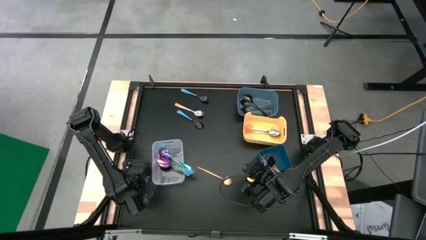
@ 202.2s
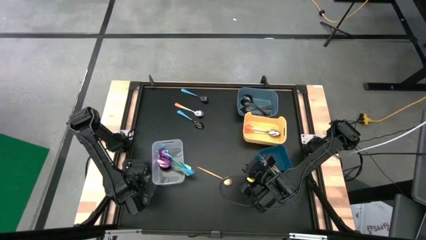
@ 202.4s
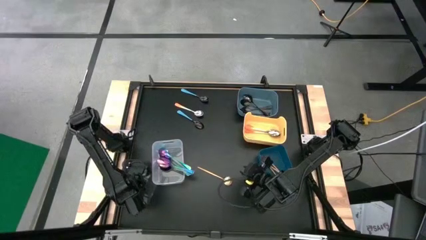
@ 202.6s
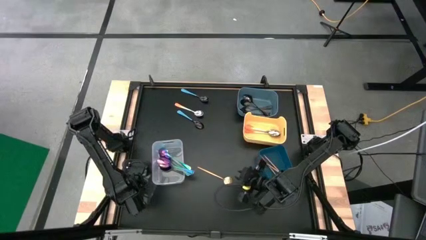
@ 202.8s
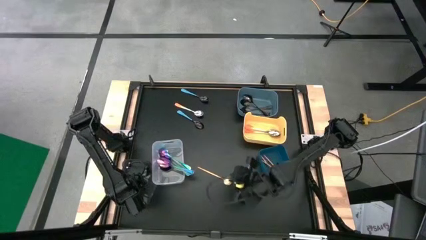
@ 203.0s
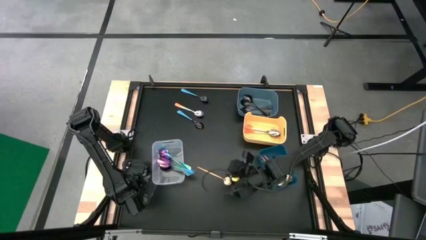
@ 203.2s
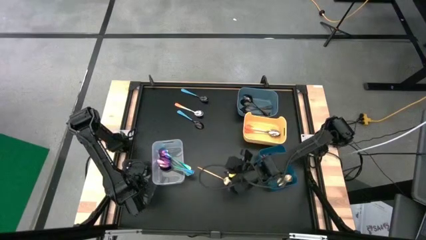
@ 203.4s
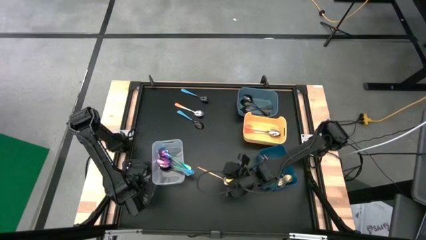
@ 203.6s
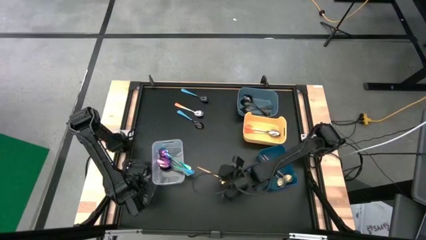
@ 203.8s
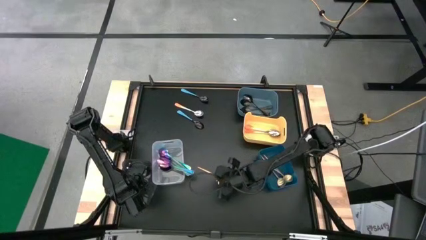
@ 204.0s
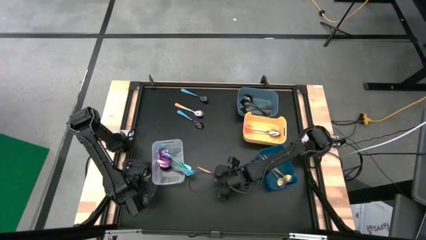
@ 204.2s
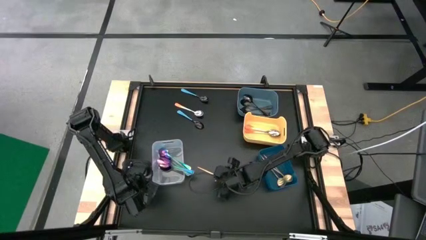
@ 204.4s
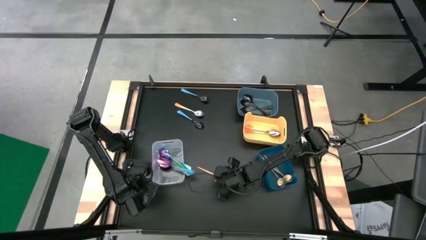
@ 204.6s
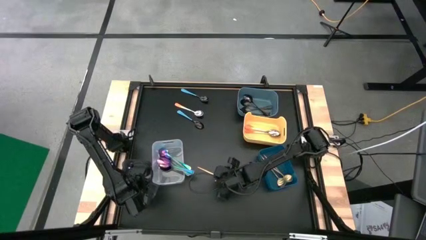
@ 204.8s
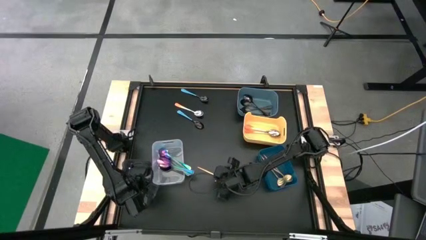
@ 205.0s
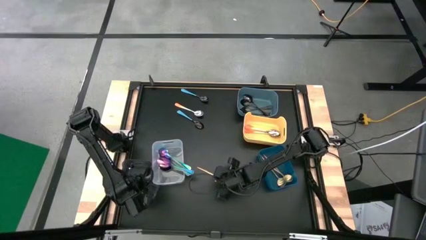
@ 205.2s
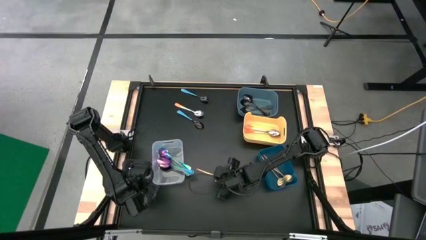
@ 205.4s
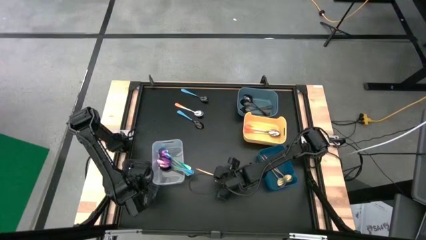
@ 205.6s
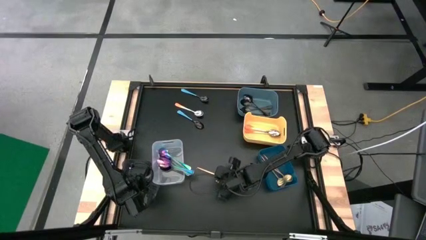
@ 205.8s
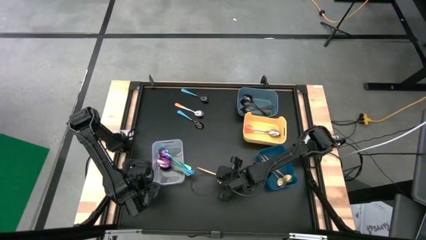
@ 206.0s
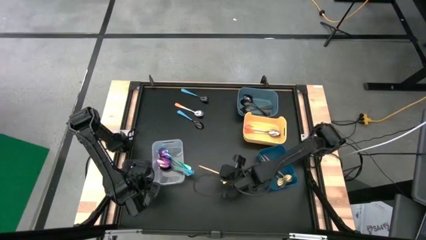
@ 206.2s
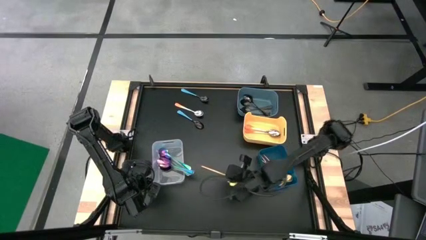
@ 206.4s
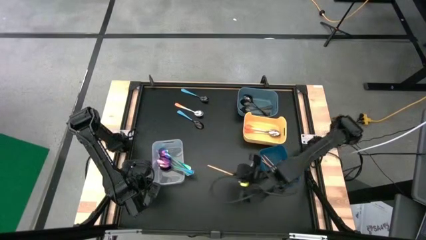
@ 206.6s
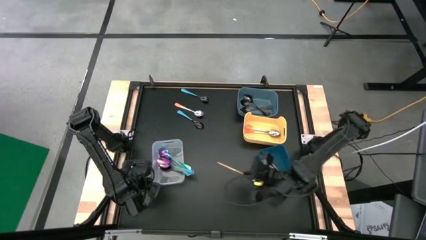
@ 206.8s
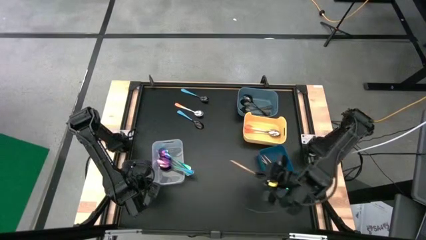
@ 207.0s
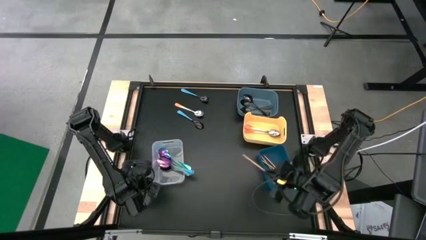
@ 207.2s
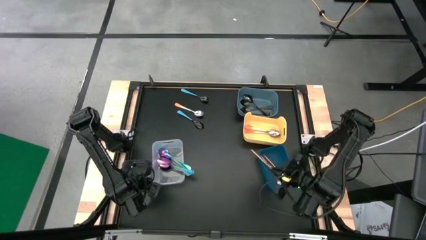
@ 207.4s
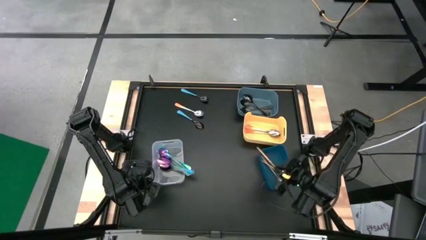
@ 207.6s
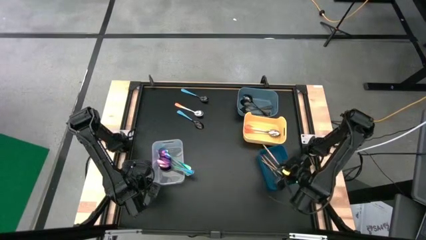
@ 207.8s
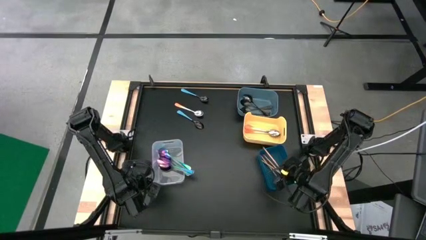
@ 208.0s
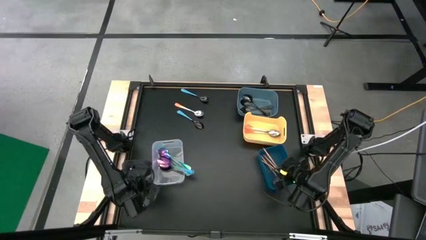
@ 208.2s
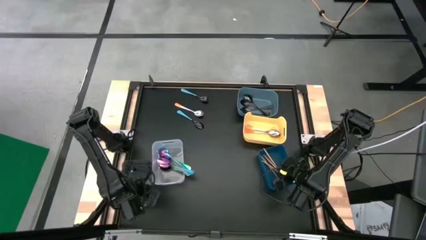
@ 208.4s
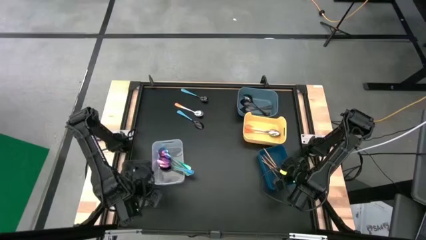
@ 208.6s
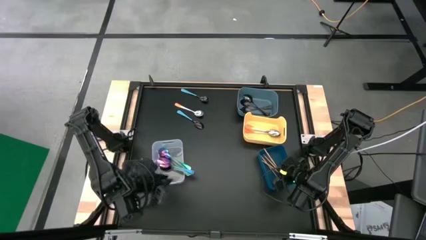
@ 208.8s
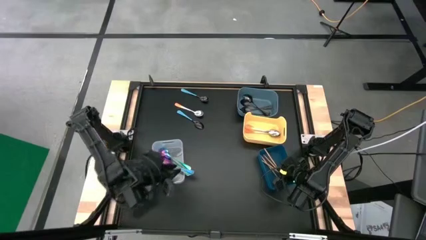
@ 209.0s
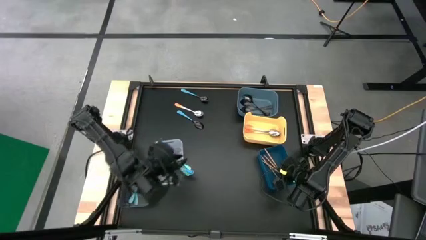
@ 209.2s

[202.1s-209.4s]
Task: Sort silverware by color (type)
Put the yellow spoon into the blue bin

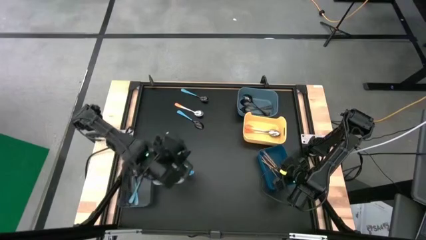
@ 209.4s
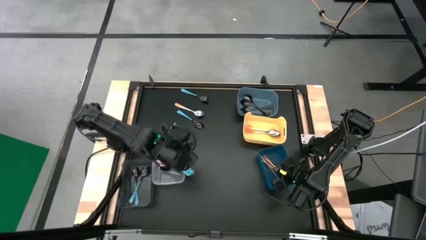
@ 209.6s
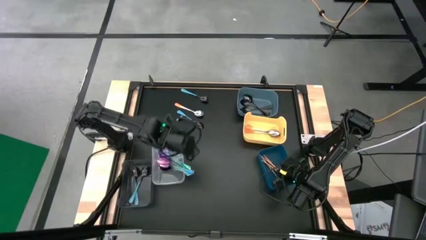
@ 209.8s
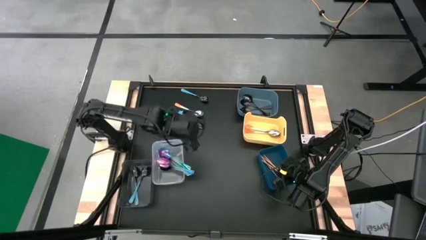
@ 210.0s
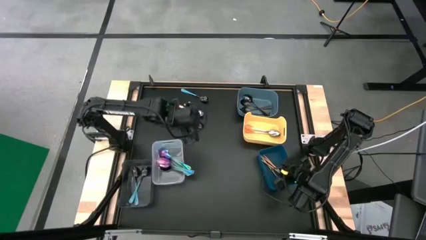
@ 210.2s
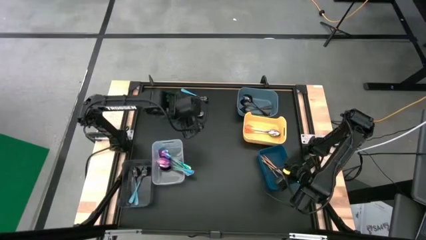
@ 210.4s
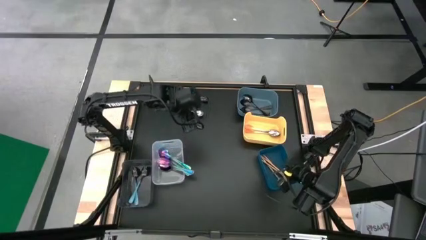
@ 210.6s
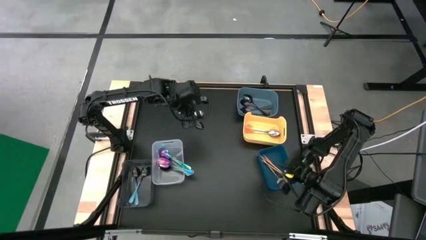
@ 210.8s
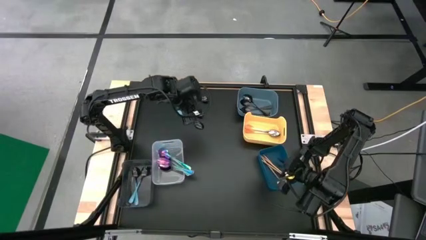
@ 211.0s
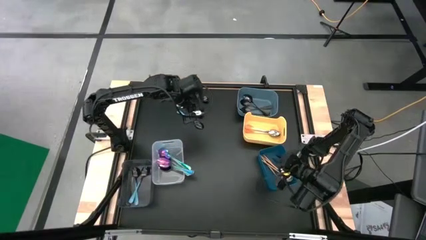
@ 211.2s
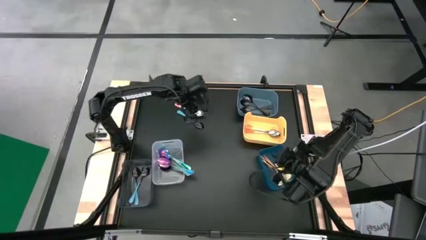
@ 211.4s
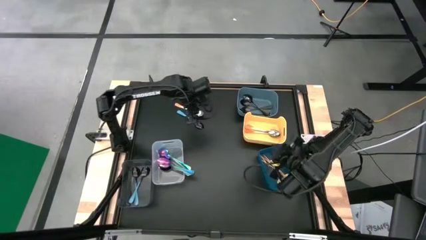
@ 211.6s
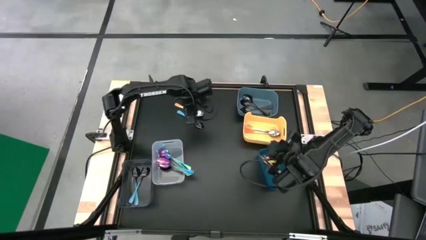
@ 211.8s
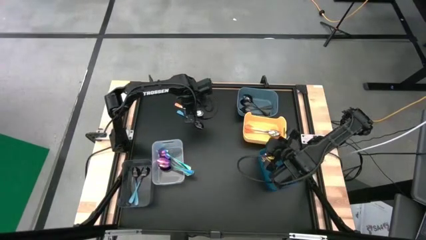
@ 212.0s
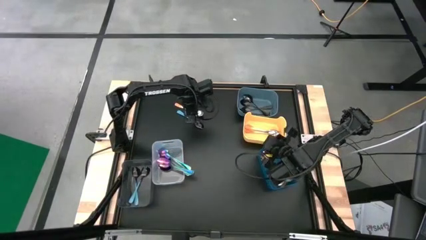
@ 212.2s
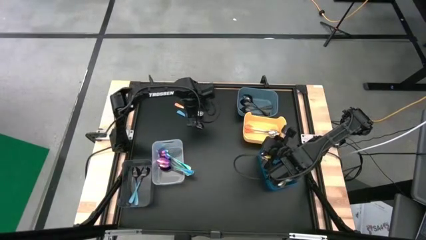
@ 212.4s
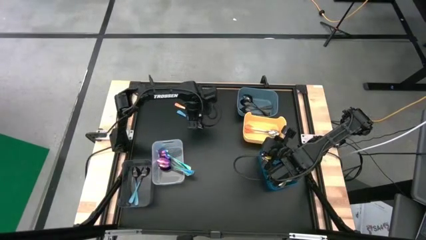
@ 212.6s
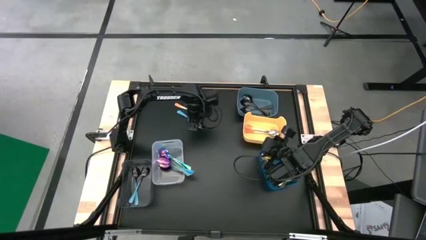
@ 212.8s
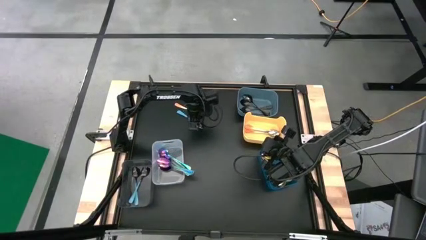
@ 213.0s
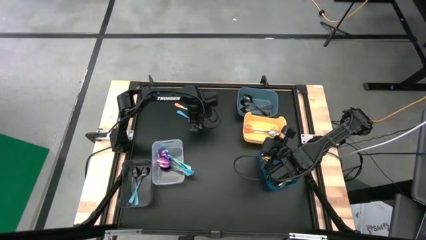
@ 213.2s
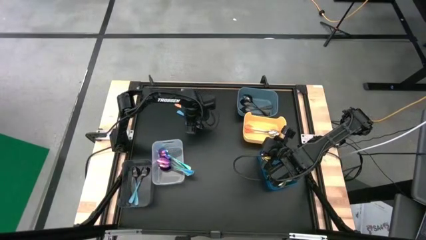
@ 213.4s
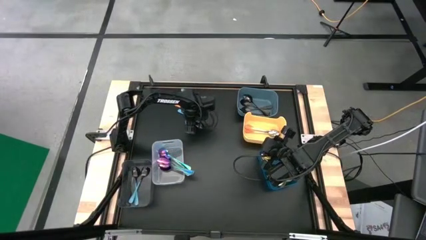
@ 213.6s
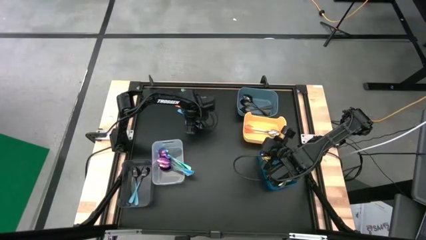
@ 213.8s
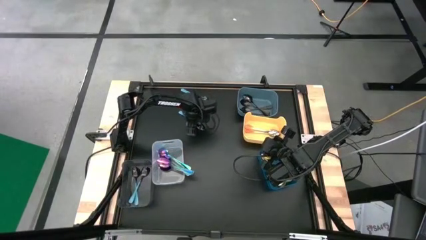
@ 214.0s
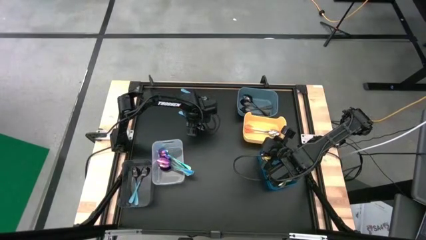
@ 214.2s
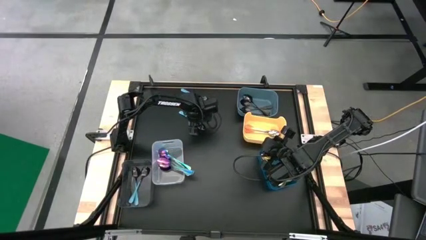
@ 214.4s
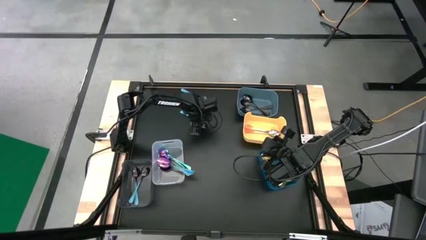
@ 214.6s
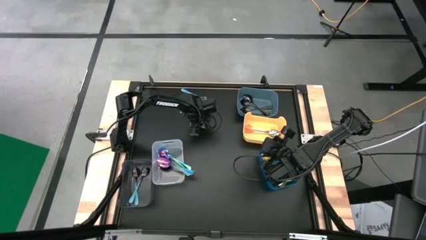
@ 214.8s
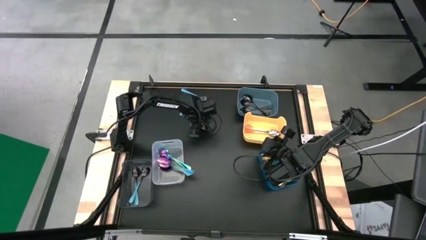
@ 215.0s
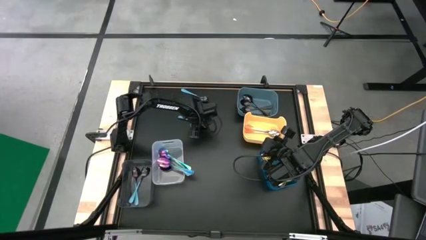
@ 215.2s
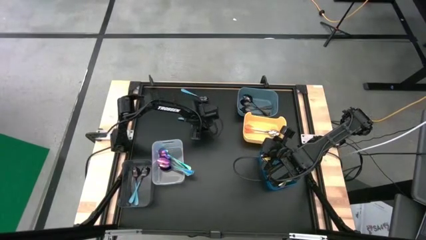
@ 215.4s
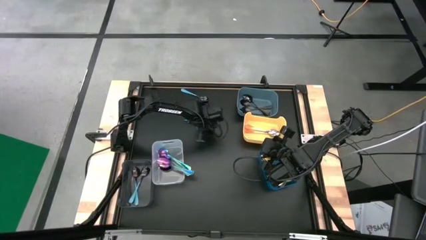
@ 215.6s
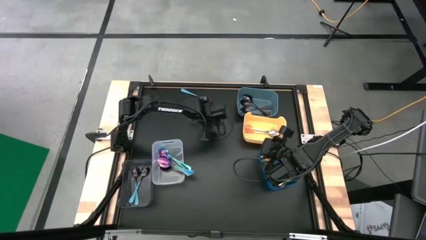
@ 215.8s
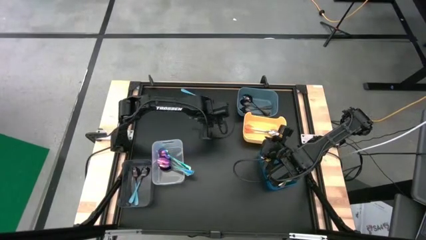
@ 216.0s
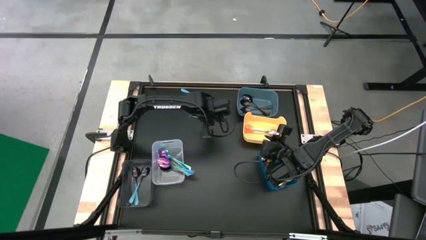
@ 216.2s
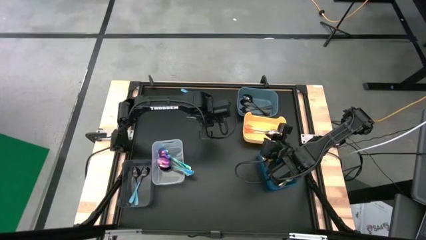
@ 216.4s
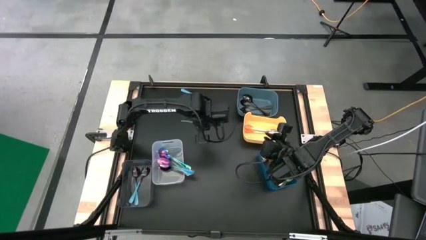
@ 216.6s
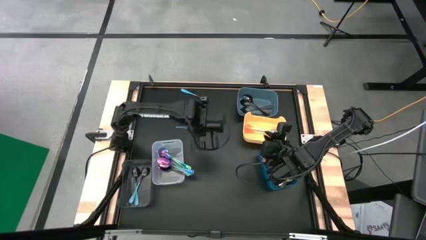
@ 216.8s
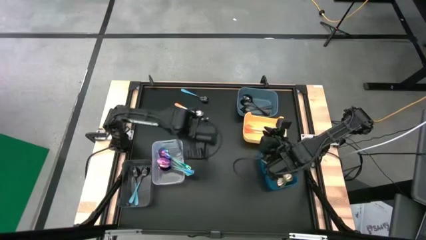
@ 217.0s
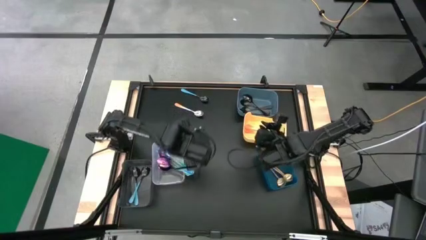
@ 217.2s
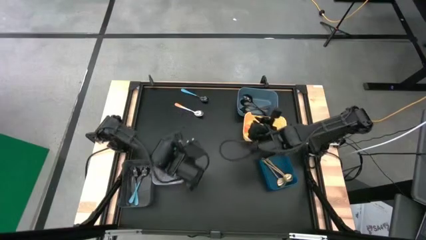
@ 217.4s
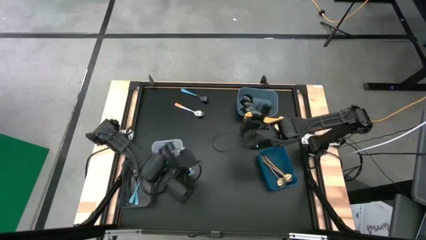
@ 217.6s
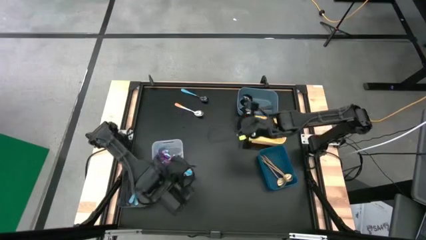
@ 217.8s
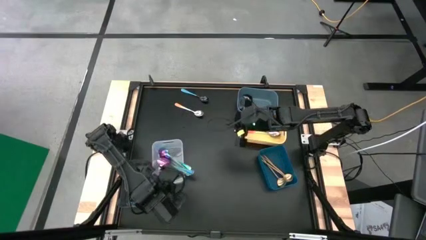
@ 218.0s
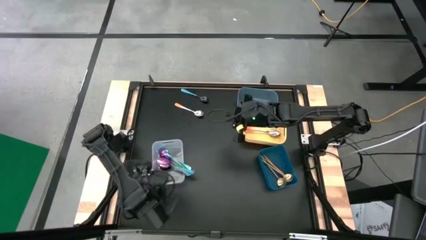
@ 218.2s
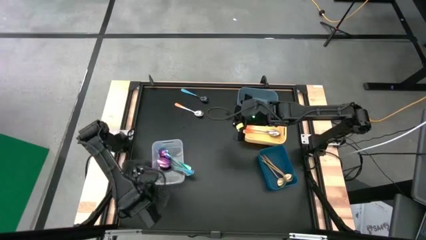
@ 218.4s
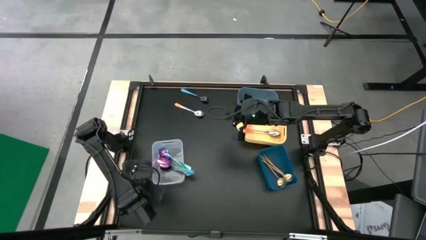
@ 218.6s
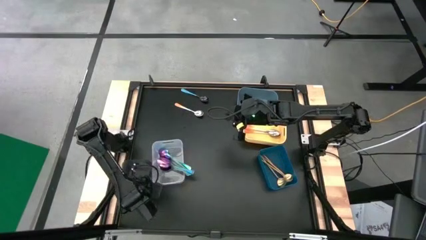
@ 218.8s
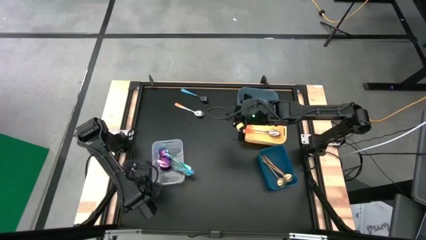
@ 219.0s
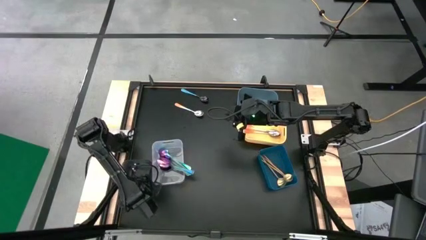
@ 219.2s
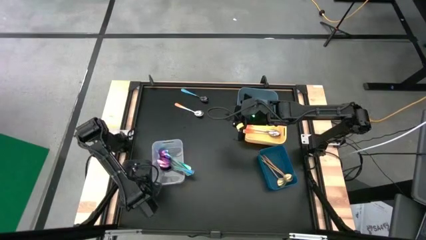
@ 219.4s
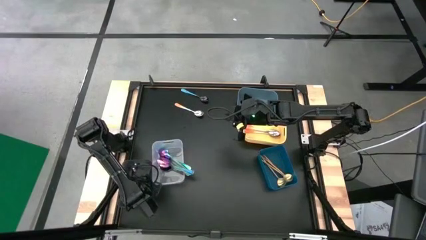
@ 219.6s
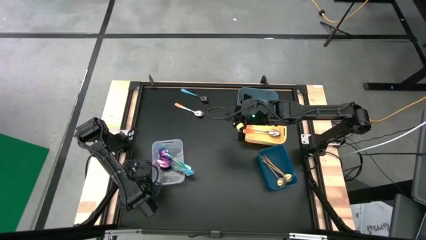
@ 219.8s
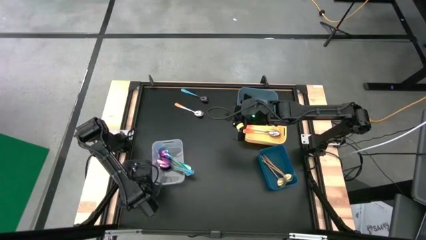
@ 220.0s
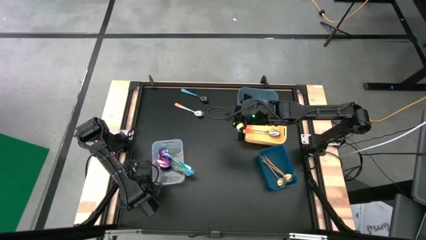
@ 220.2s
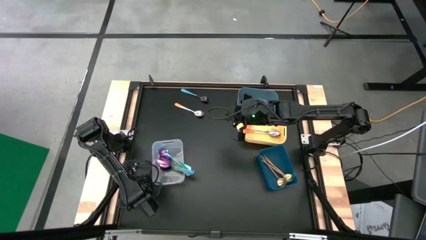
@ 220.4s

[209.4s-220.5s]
Put the light blue spoon into the black bin
